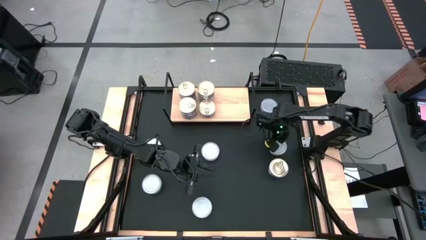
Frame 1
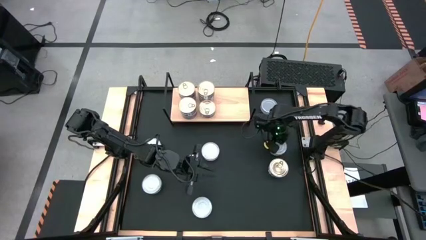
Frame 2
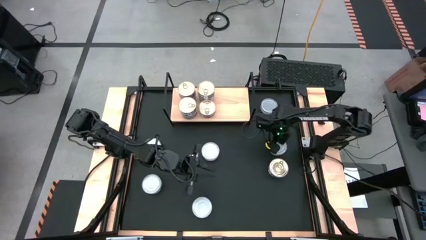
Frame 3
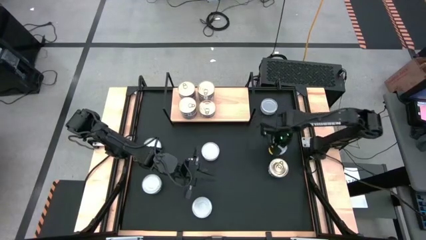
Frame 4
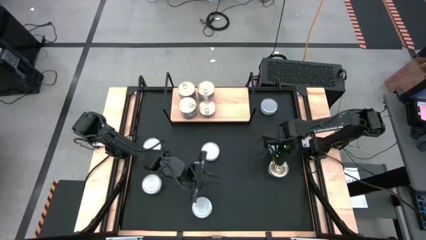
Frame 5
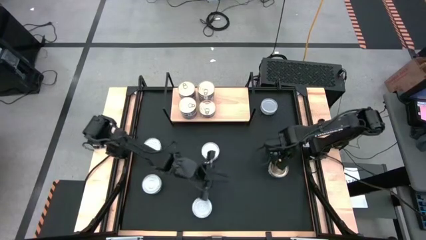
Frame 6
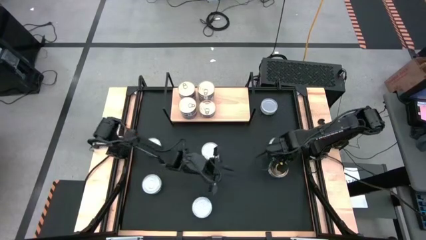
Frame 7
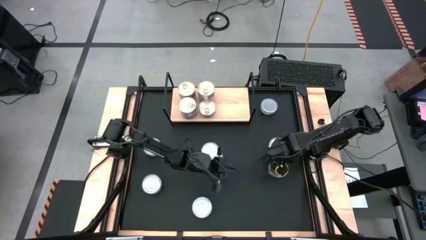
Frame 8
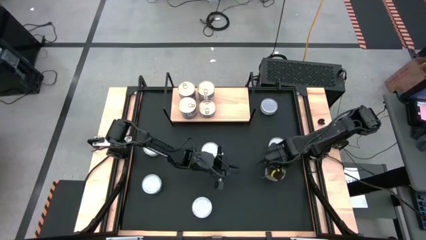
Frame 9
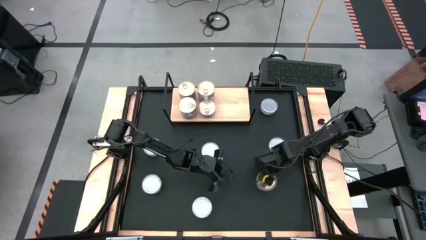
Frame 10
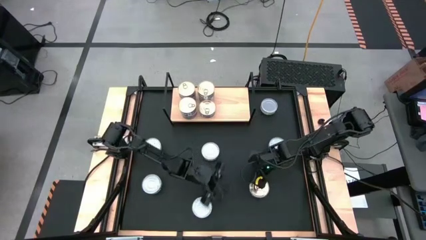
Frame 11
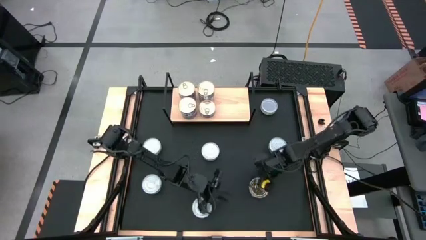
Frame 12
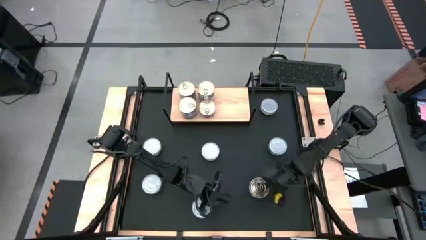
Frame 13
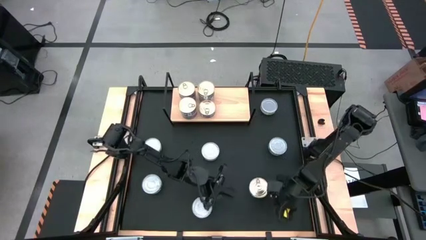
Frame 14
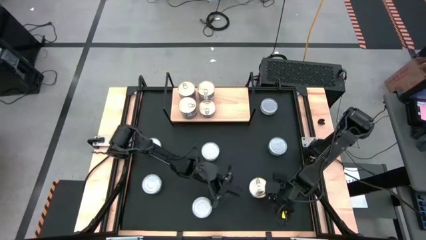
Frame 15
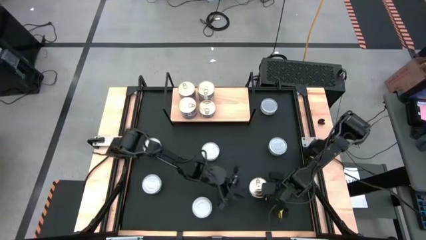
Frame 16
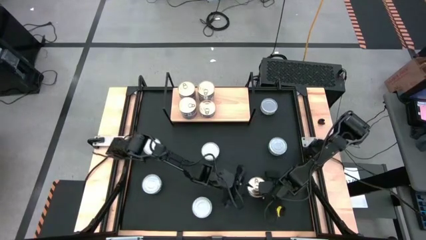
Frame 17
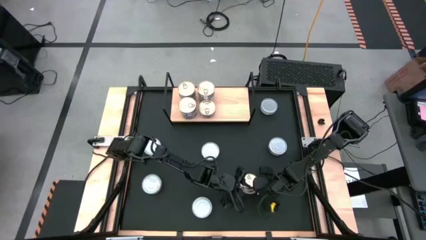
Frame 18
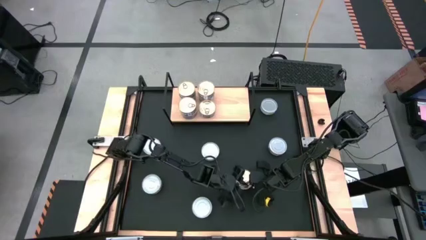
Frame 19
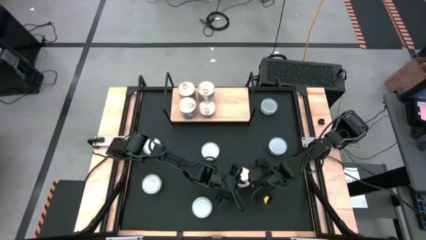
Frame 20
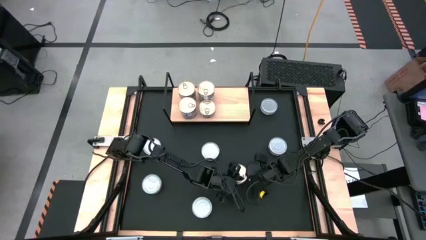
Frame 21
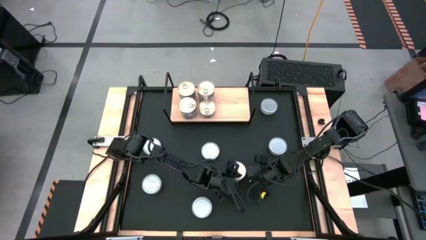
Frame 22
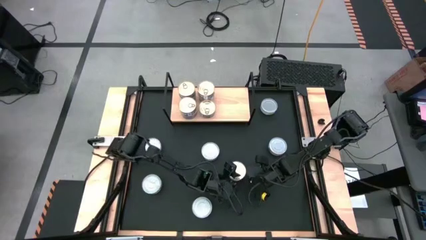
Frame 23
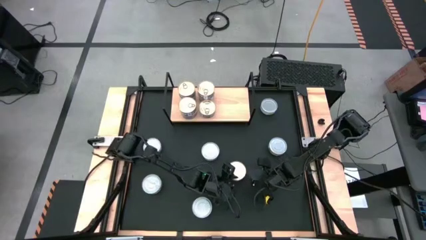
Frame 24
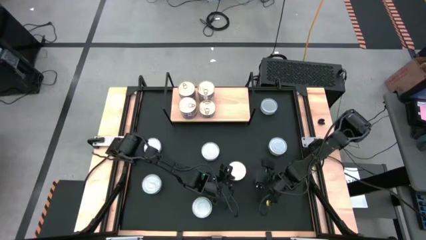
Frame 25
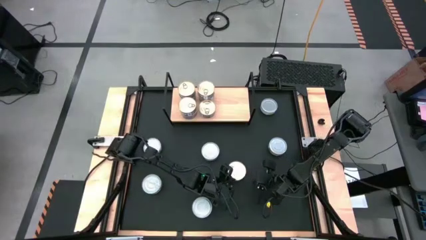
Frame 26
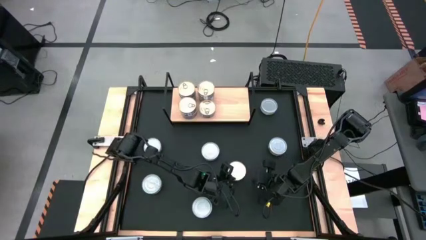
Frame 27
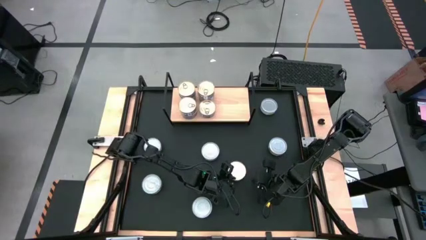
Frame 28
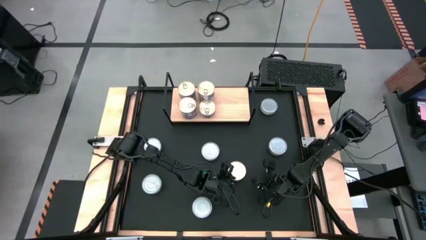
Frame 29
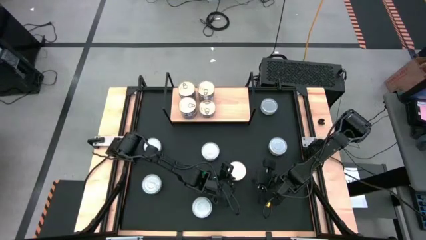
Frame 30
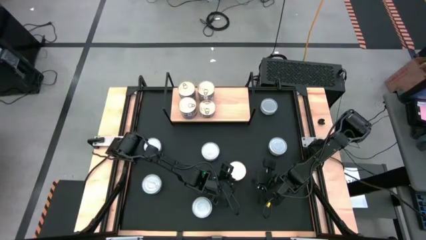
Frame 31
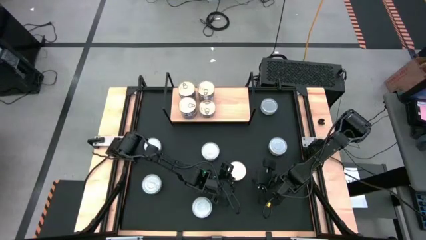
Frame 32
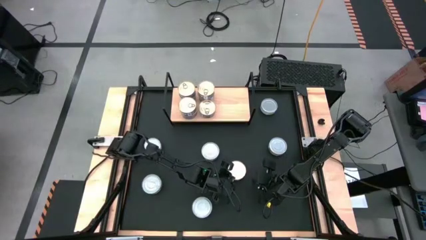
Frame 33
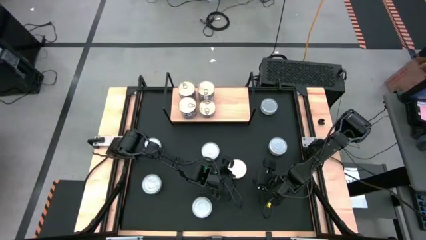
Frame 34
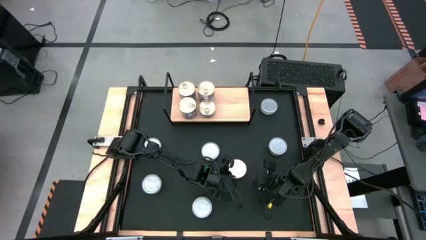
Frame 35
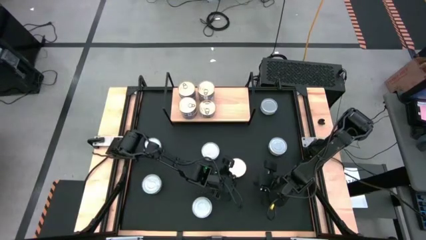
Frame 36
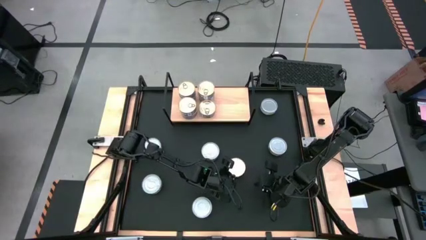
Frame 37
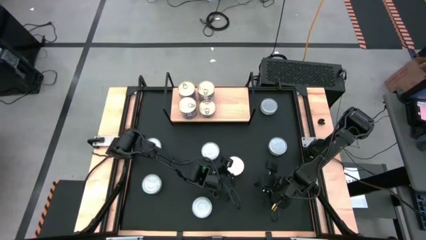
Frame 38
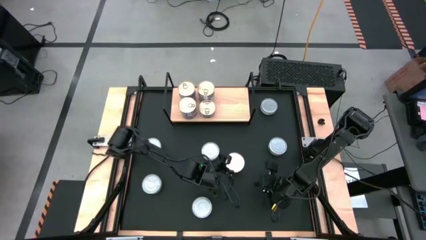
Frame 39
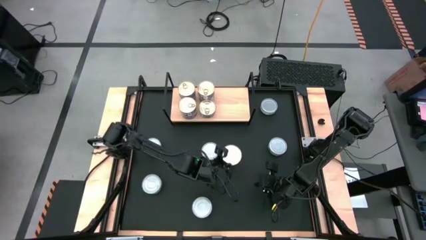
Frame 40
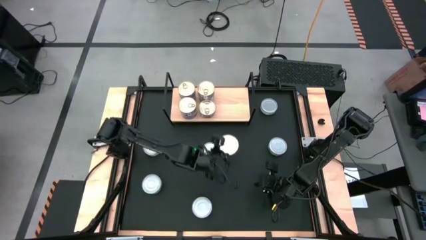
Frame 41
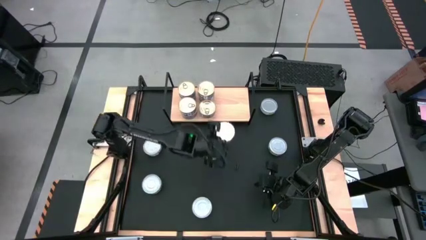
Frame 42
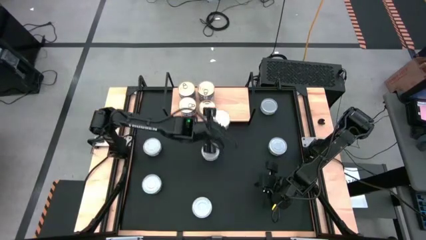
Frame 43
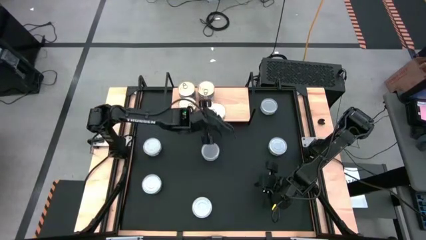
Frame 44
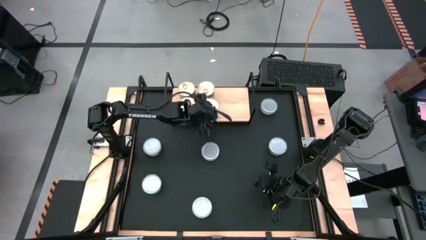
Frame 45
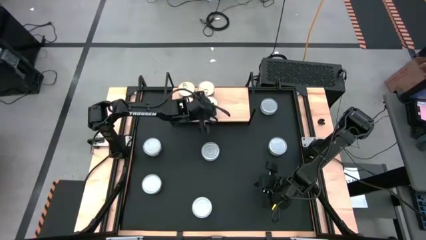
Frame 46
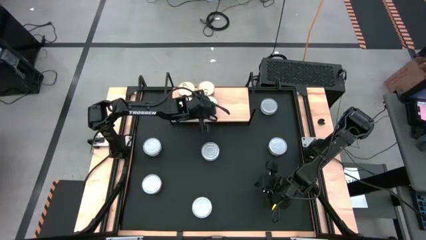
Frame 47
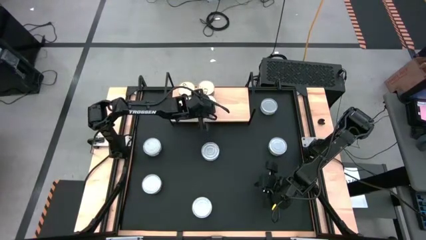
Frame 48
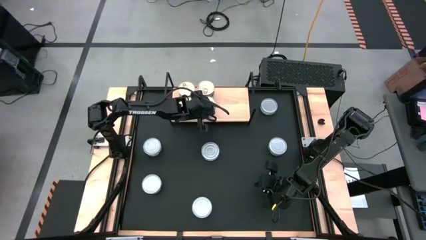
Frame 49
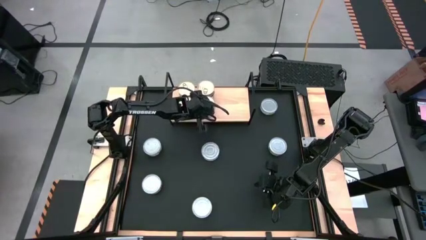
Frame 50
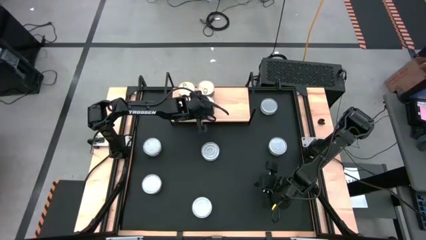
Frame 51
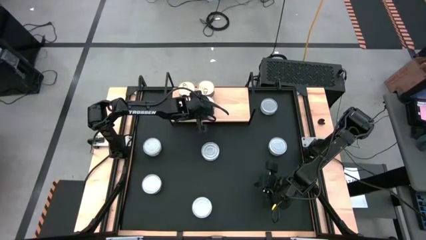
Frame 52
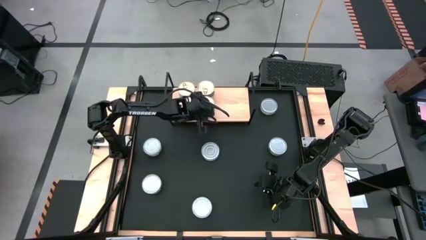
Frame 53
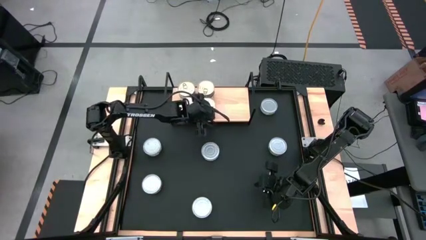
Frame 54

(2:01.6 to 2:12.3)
Task: Stack canned seafood by type on shelf
Stack the blue tuna can on top of the blue tuna can on the shelf

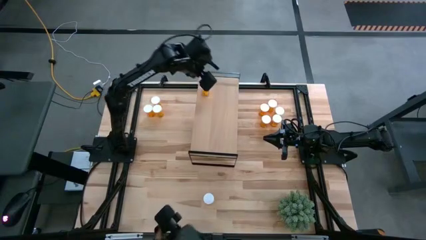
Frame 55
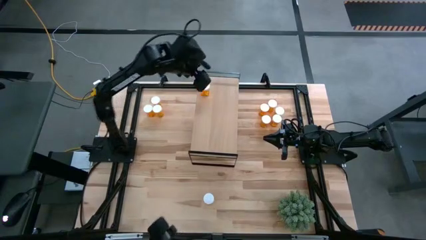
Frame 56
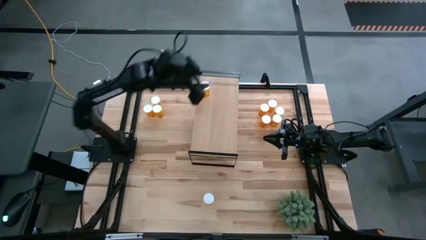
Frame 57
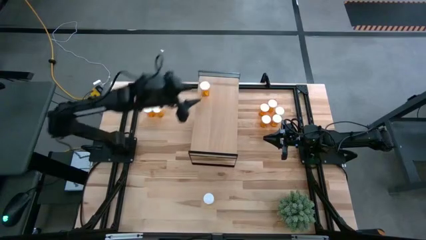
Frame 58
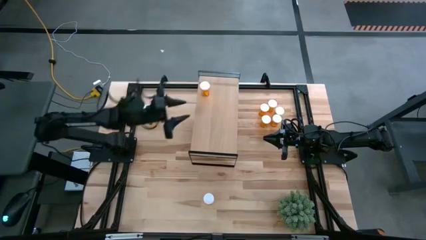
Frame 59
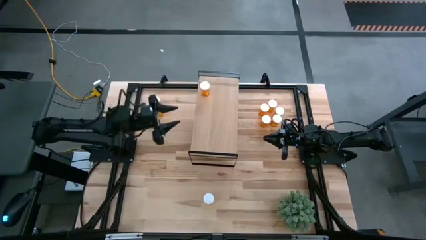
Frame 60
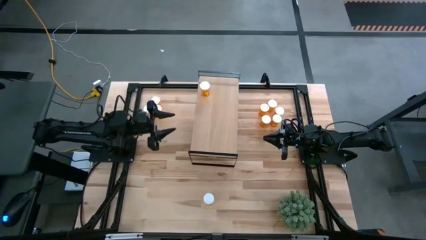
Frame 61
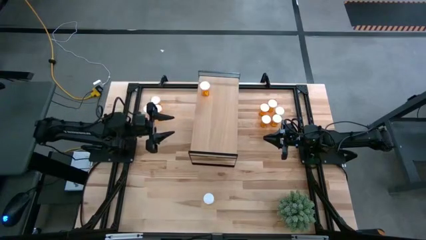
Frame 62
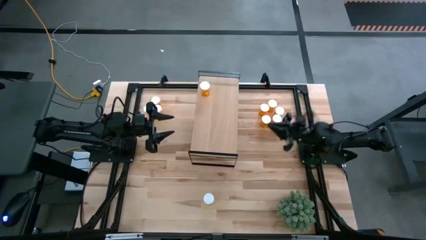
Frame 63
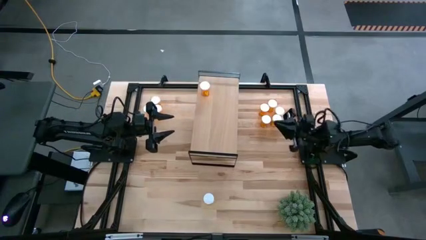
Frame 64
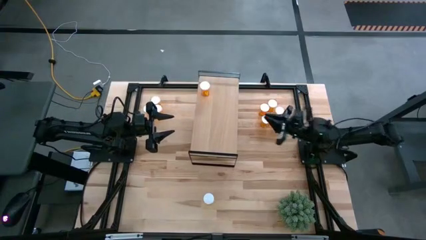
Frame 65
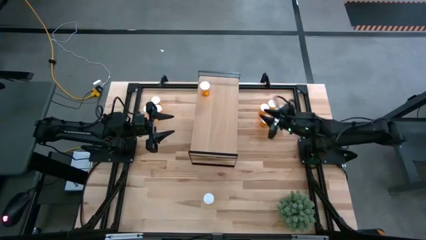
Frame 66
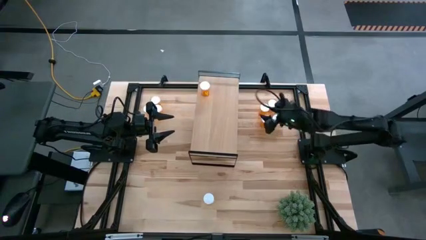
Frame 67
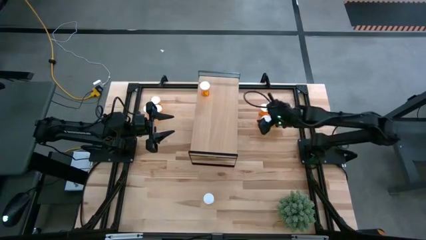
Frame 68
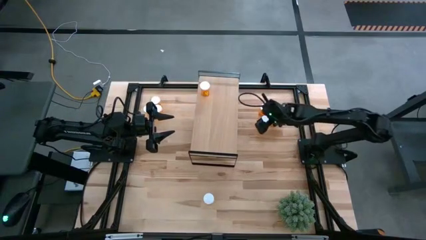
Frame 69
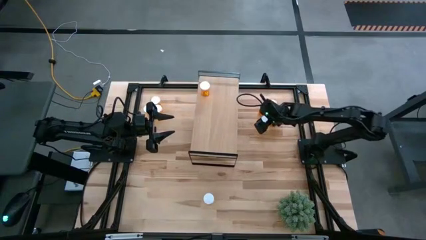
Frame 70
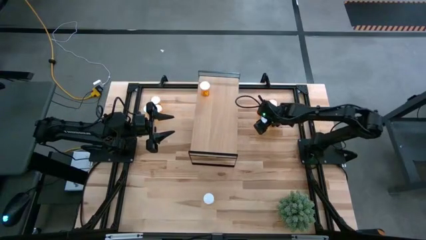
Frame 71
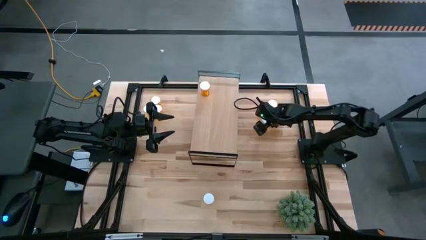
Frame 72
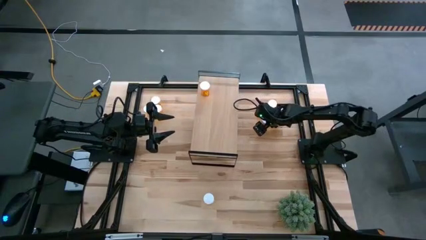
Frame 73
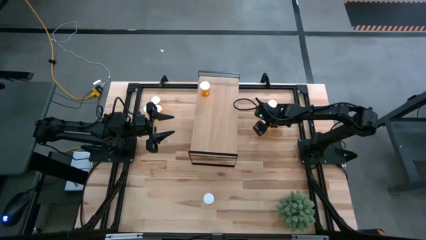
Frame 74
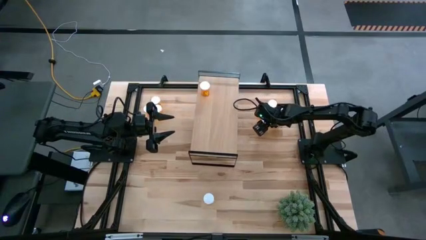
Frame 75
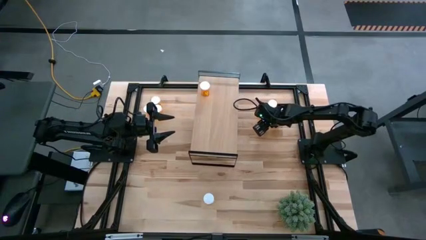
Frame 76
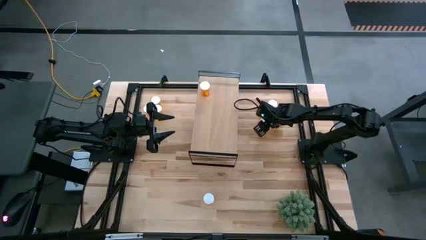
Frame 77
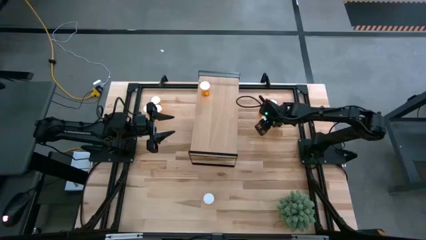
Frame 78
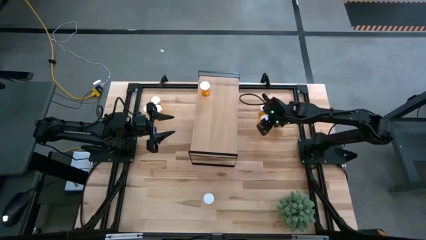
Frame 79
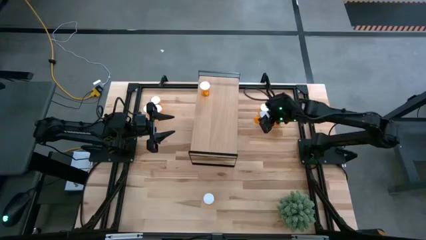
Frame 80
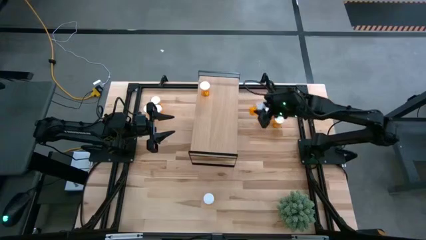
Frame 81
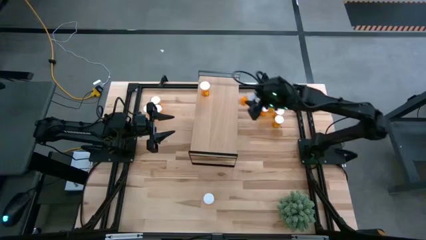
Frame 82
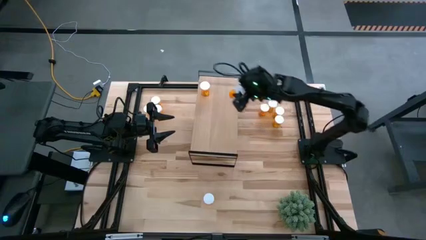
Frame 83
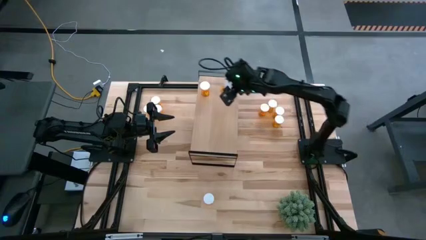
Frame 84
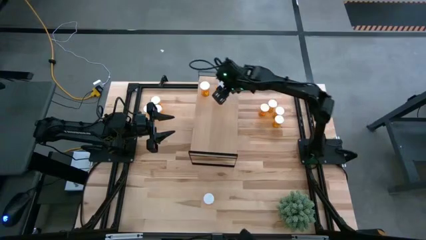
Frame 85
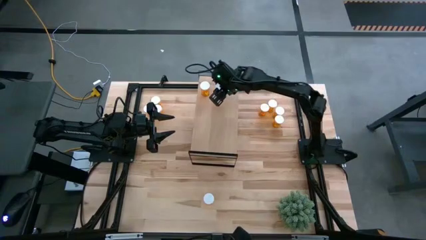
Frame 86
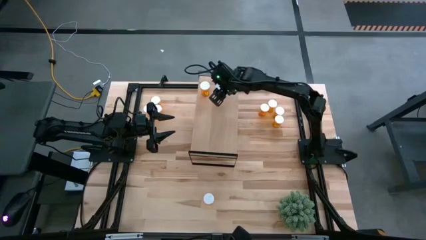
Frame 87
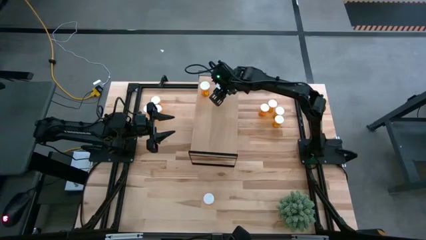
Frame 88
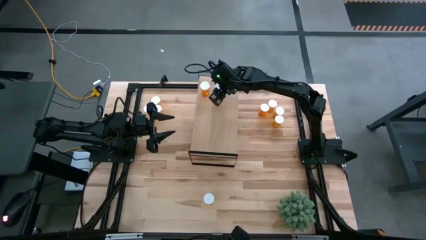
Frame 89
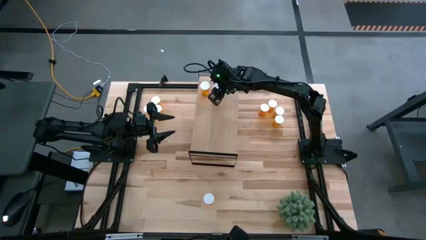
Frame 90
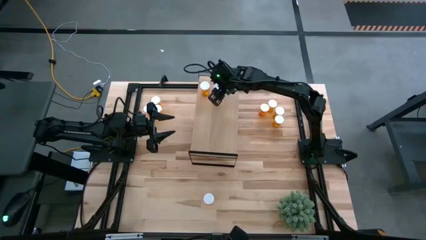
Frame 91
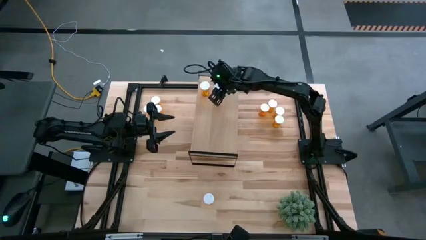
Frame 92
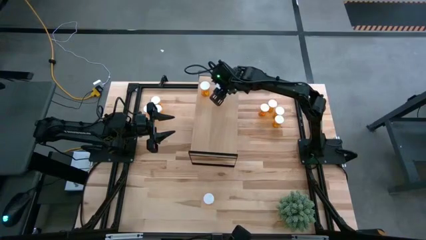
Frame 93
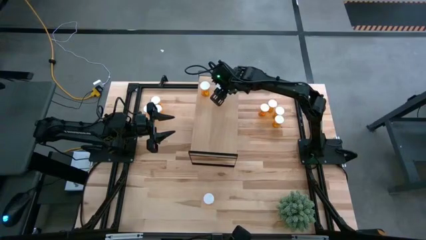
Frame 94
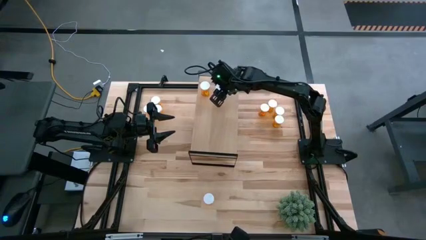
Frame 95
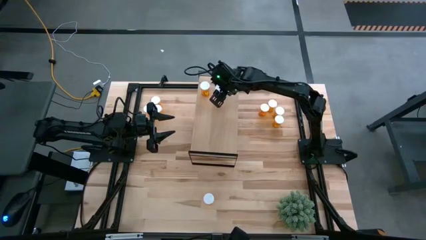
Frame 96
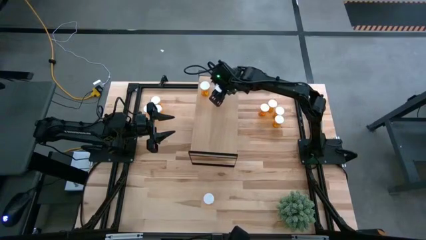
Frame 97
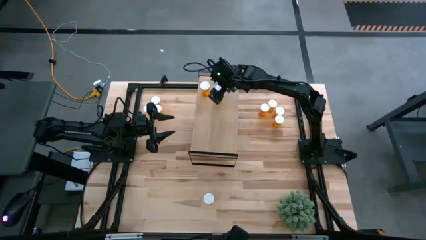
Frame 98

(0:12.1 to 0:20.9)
Task: Pick and place medicine bottles onto shelf by color
Put the orange pill bottle on the shelf
